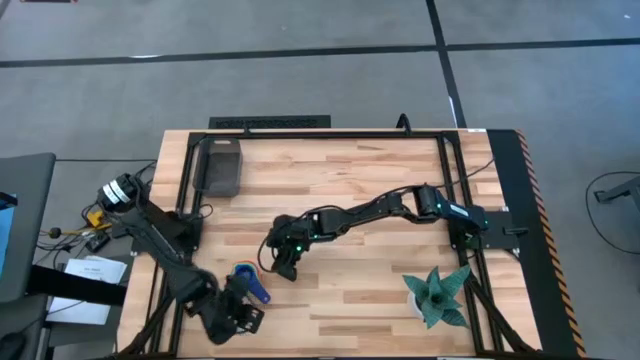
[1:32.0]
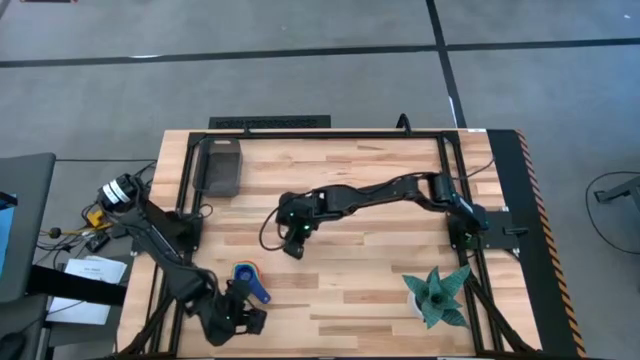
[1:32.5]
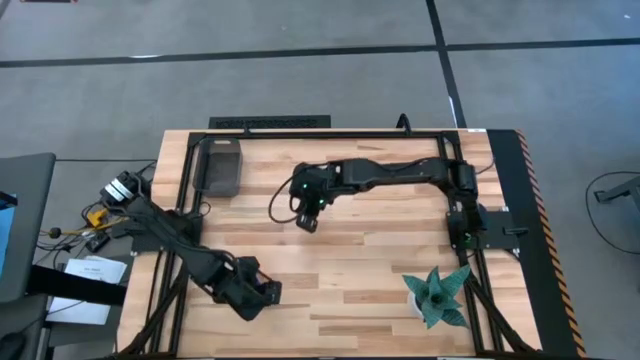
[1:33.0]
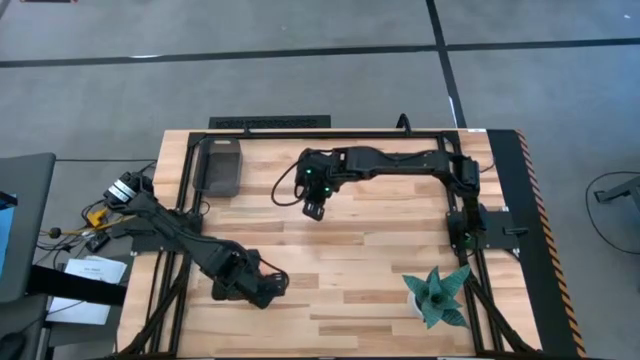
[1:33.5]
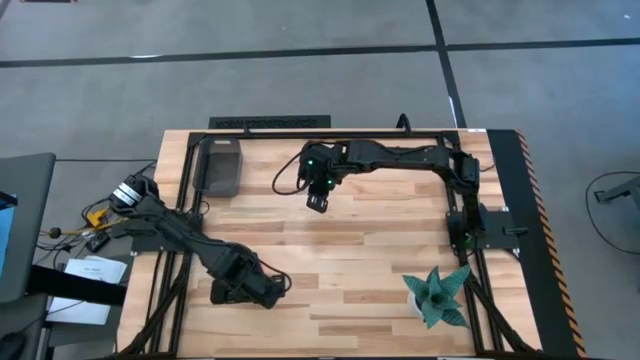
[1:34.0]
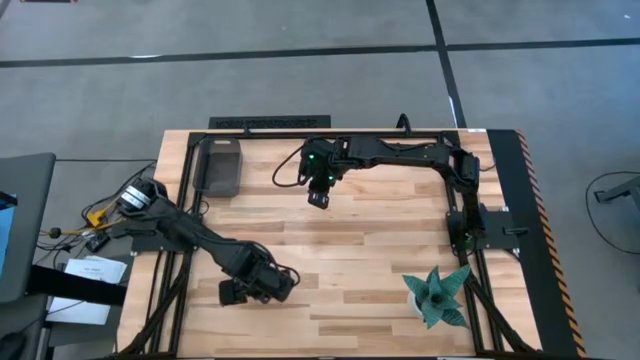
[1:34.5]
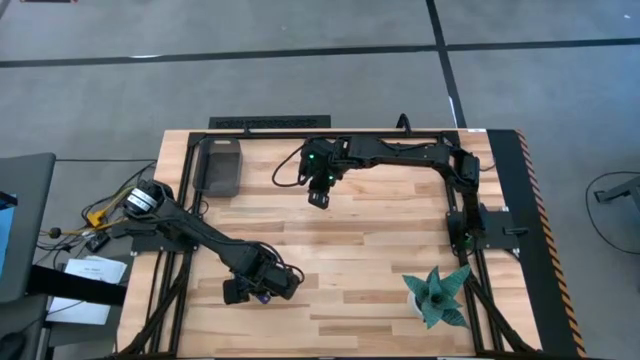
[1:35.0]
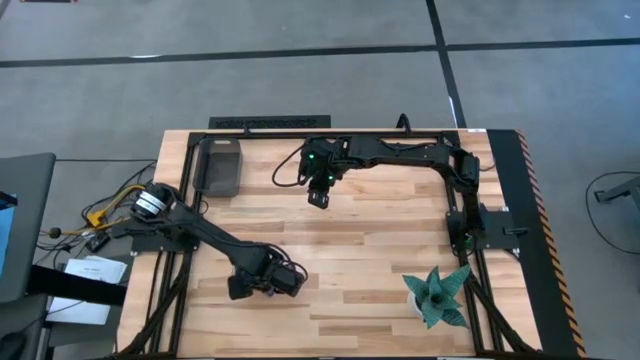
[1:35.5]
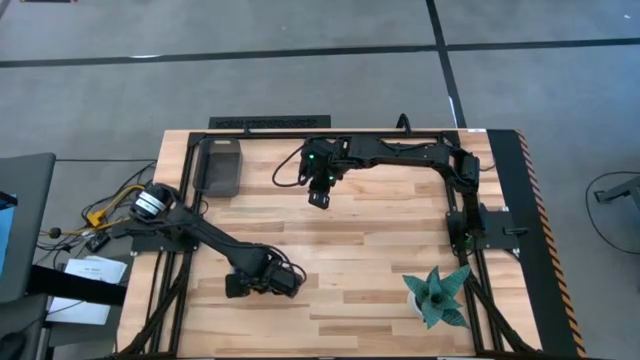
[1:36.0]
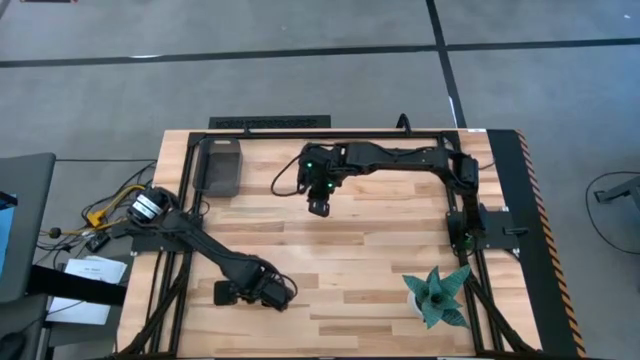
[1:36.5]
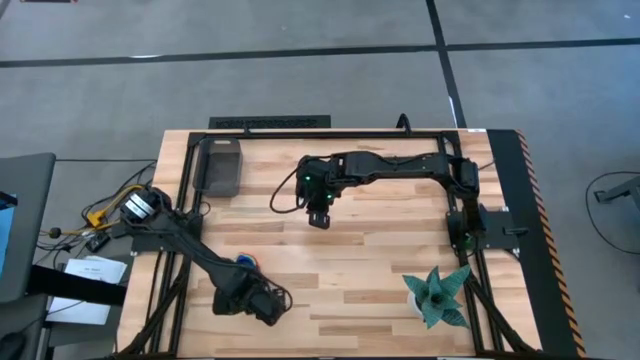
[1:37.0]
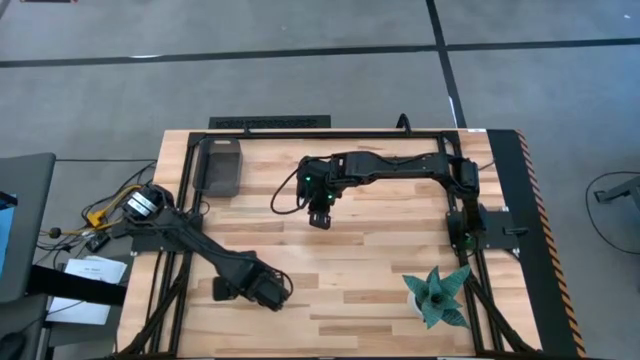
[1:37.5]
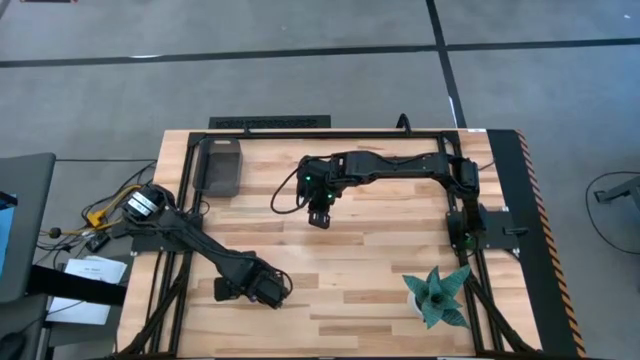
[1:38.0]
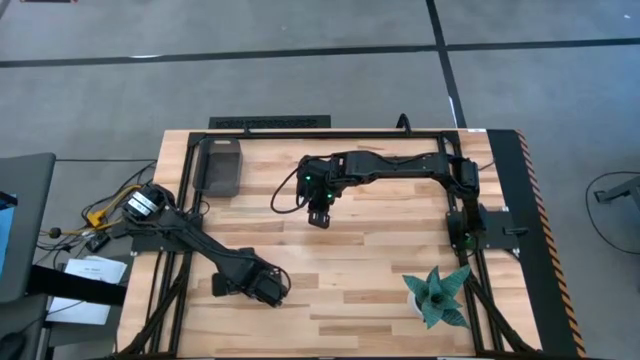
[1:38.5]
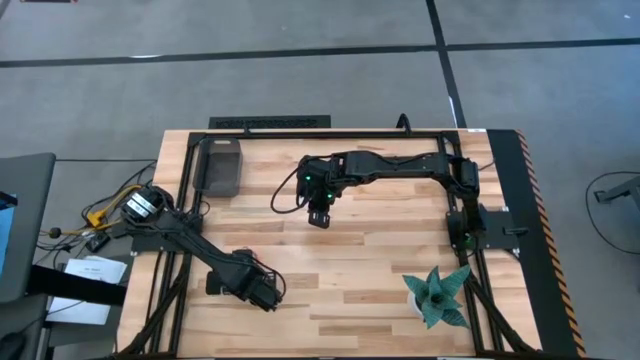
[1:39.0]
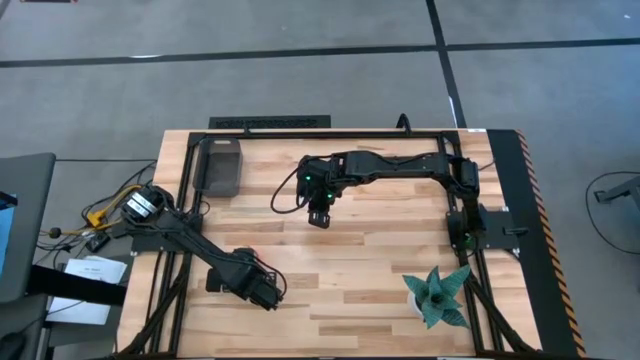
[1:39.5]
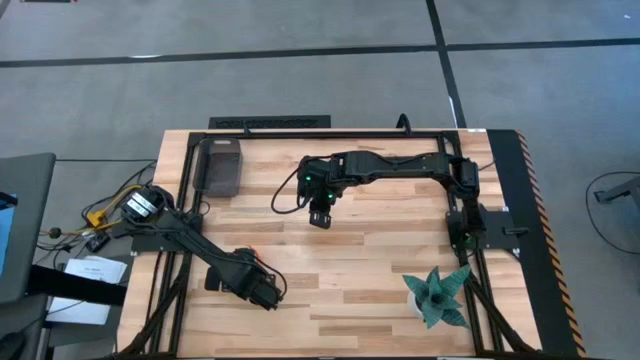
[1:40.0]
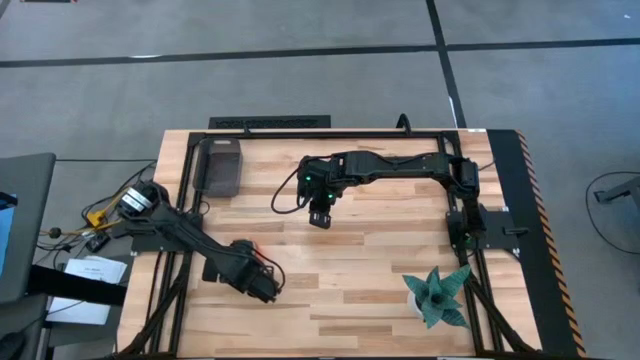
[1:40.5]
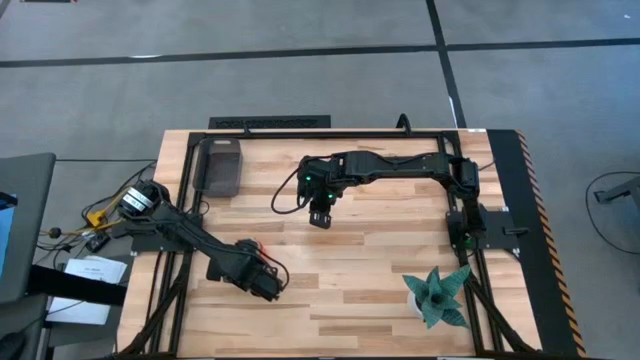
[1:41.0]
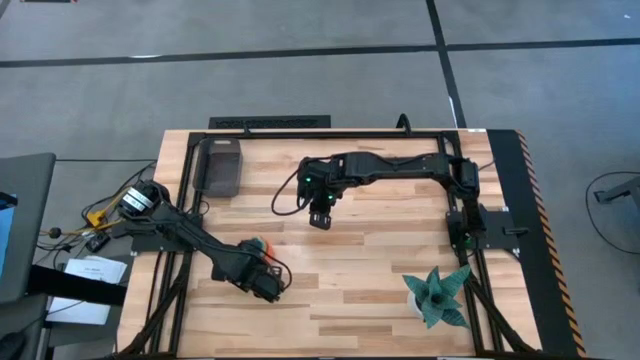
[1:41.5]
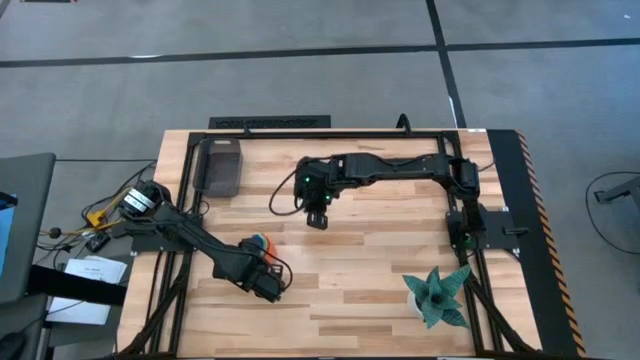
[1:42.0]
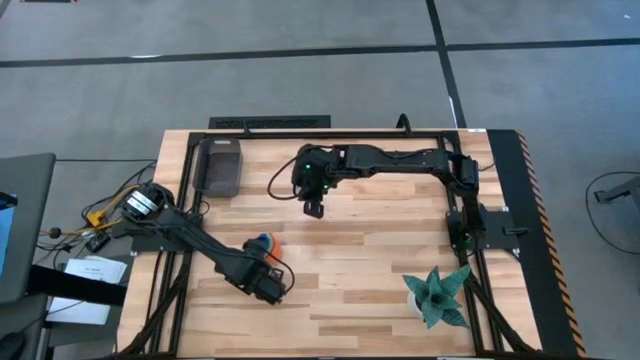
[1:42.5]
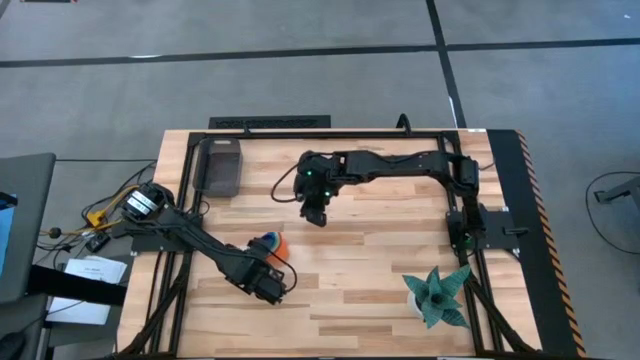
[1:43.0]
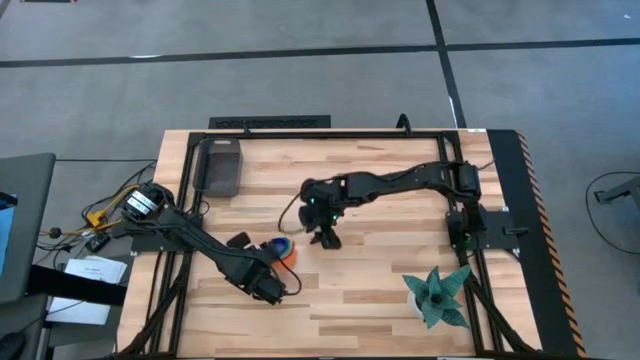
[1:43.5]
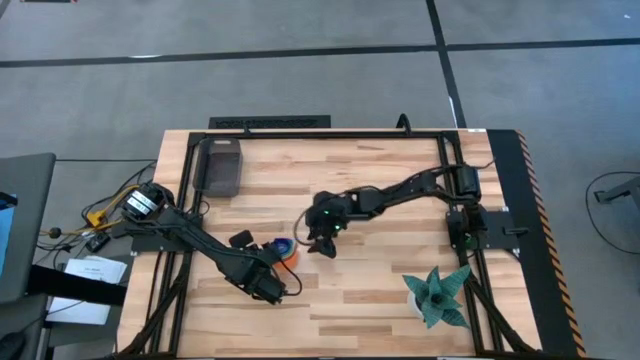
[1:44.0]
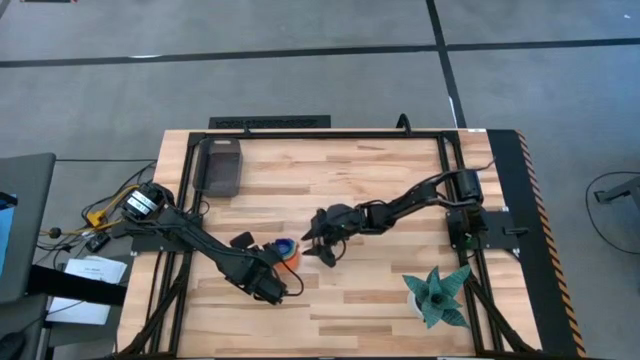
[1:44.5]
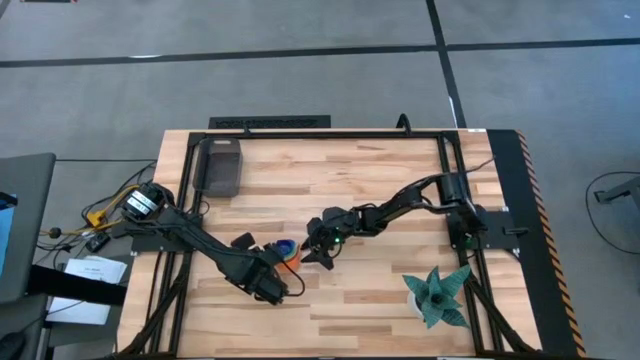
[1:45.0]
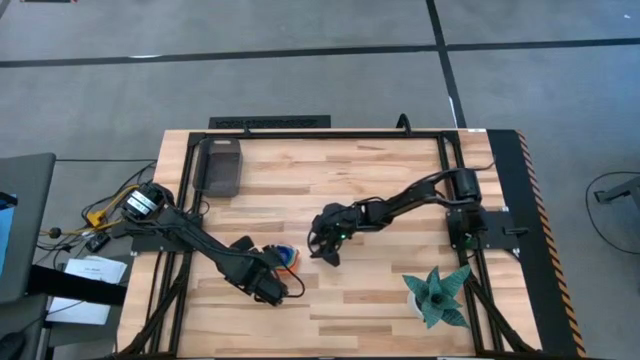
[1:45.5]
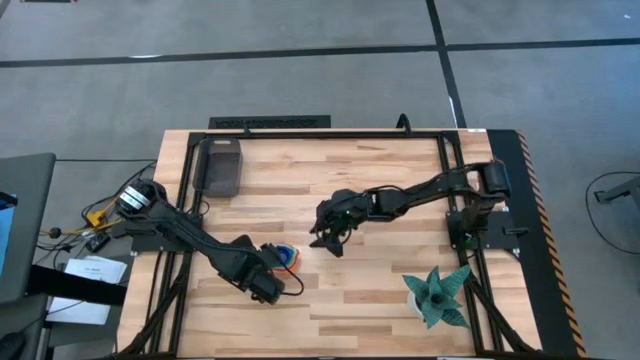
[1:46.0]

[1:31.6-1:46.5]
Task: Nest measuring cups in basket
Put the stacked measuring cups into the black bin

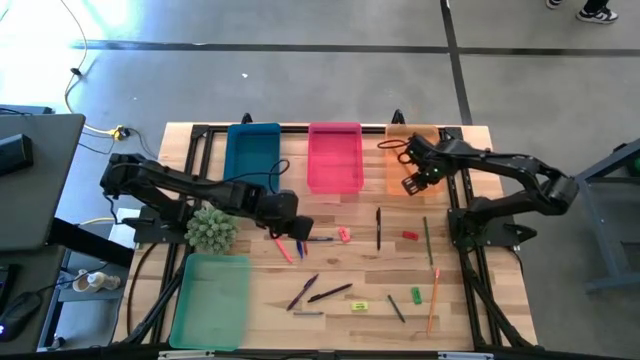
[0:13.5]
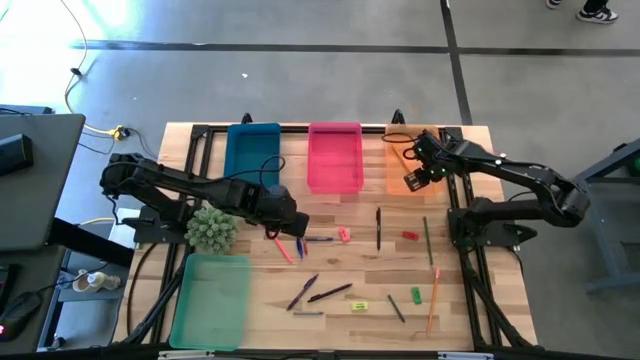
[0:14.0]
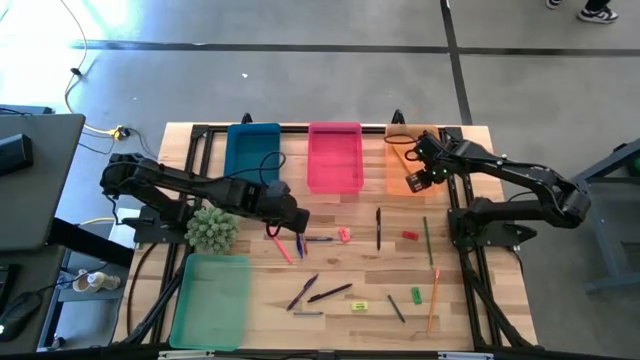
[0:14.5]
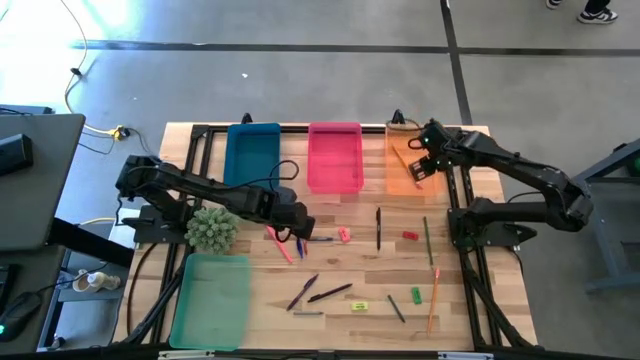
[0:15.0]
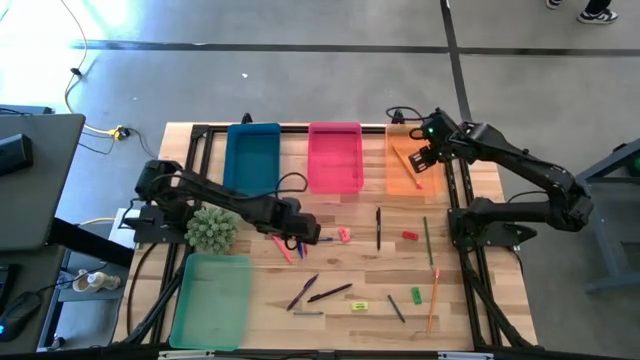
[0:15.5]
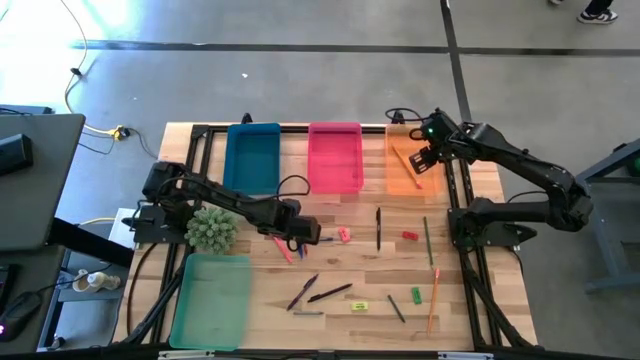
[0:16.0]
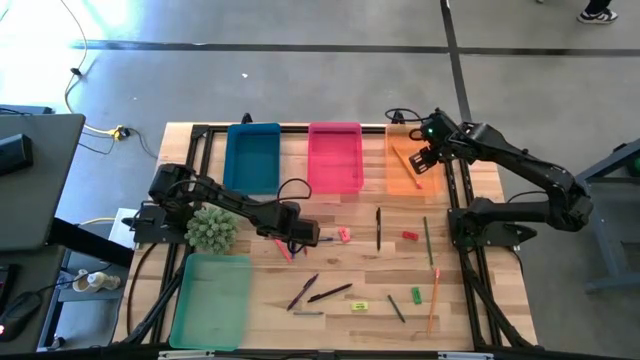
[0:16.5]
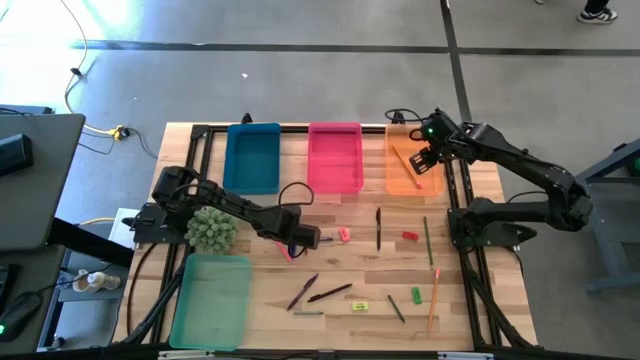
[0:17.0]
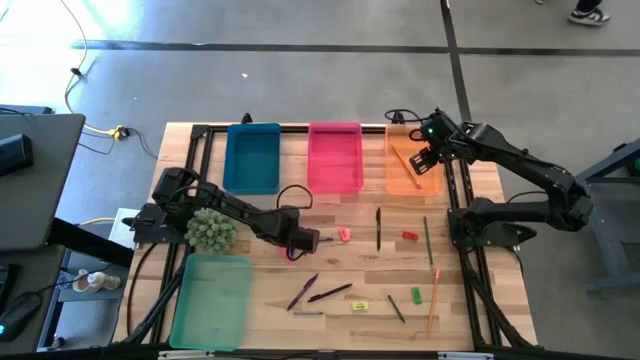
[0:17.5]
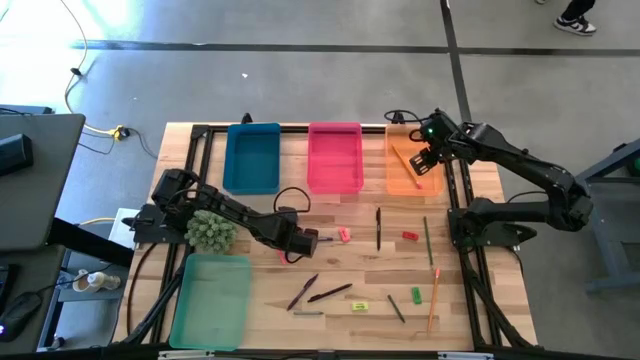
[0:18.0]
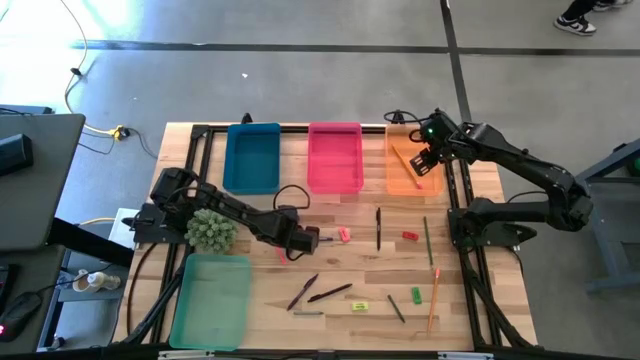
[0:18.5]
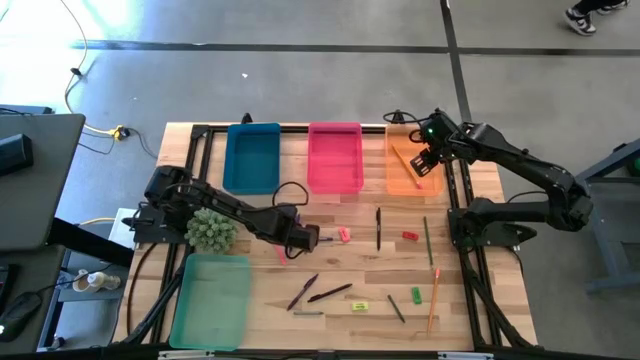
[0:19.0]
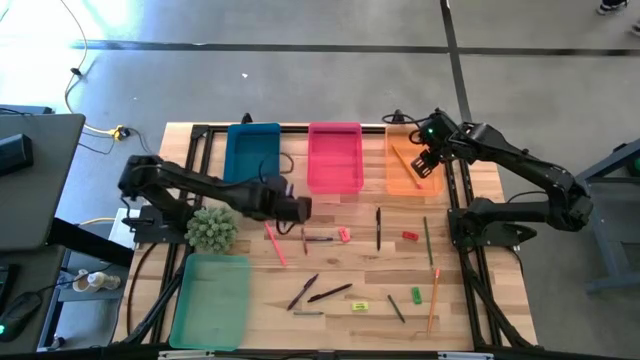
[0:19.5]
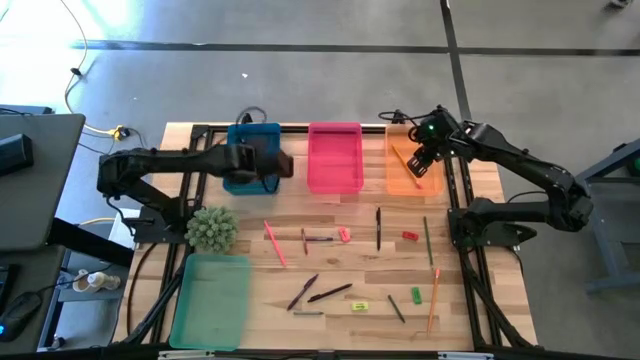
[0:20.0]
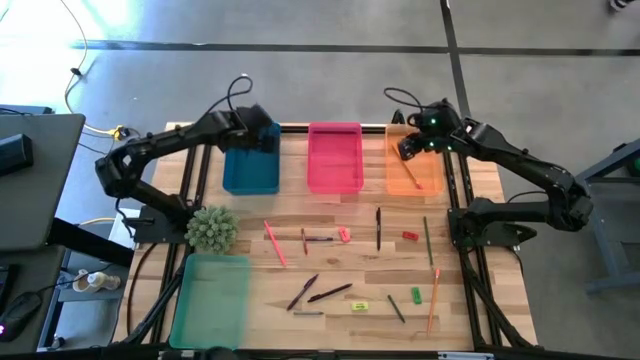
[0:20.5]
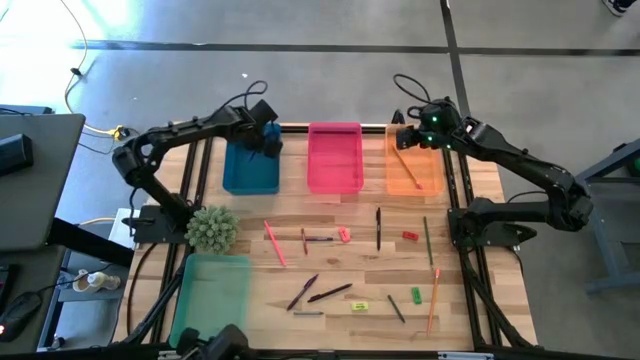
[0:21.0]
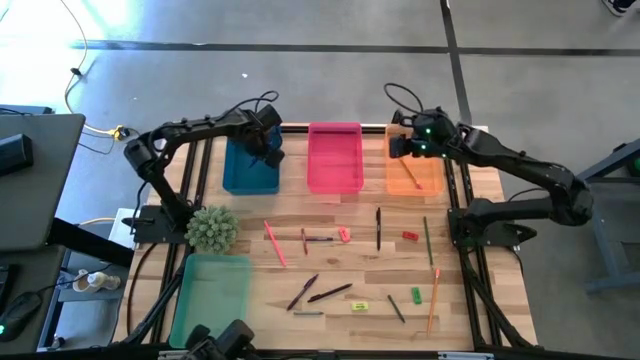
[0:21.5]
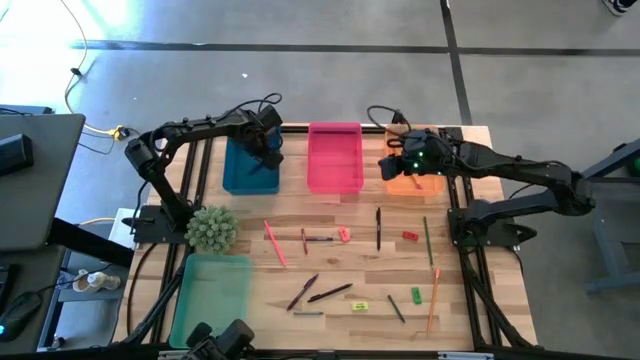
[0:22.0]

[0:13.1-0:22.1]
Task: Sort crayons/erasers/pens/pencils in bins
Put the blue pen into the blue bin
